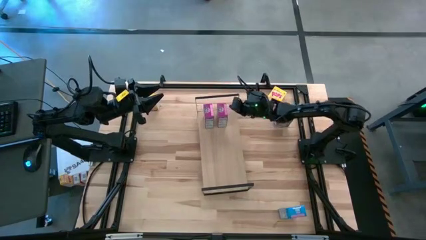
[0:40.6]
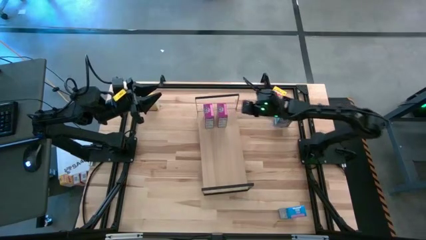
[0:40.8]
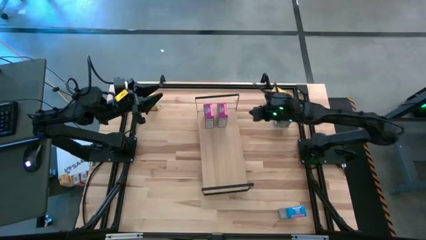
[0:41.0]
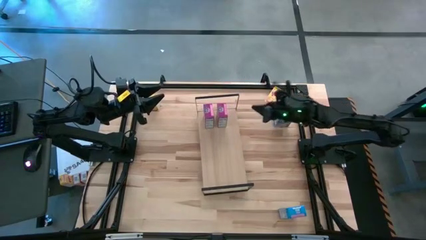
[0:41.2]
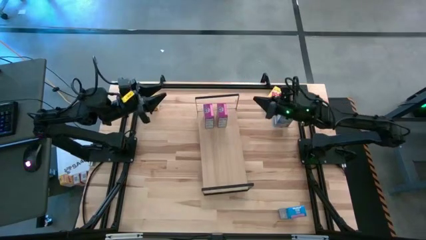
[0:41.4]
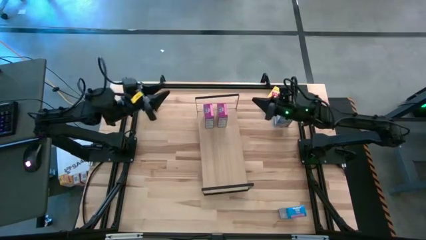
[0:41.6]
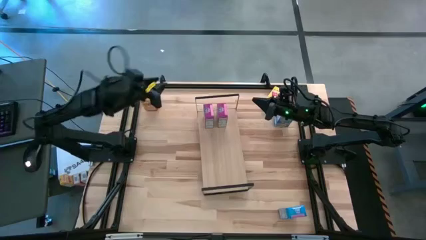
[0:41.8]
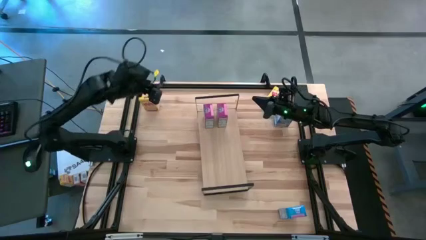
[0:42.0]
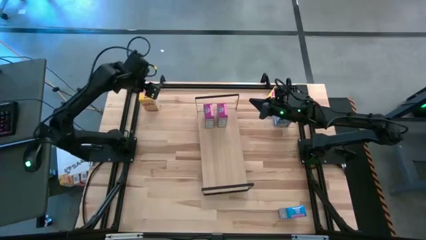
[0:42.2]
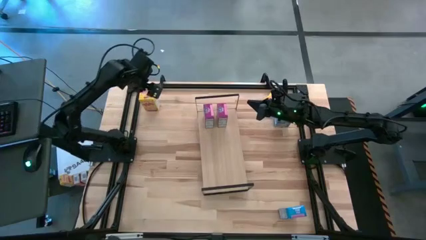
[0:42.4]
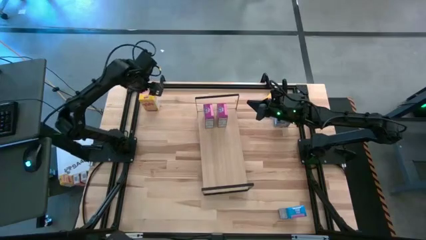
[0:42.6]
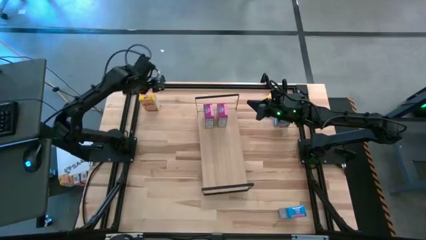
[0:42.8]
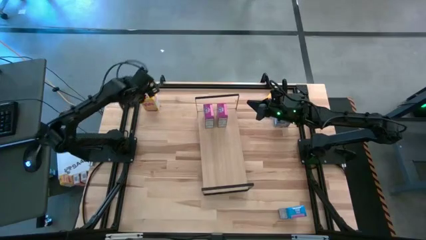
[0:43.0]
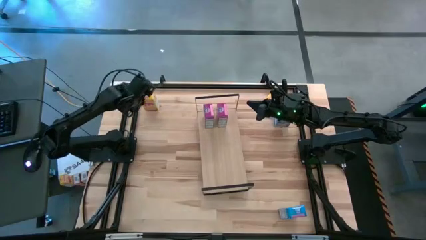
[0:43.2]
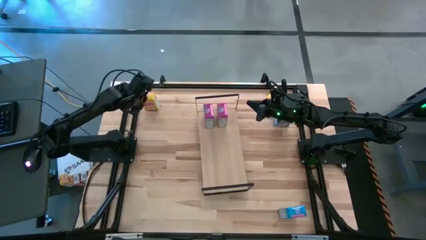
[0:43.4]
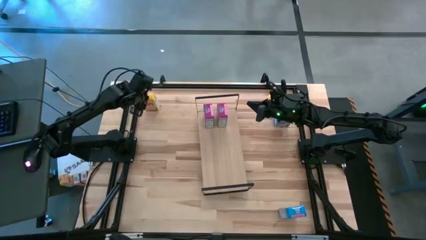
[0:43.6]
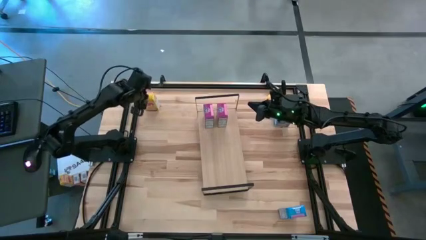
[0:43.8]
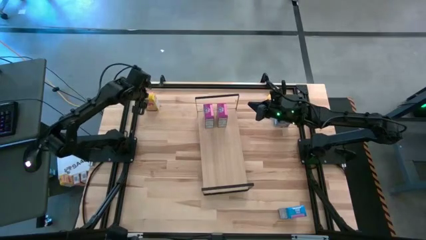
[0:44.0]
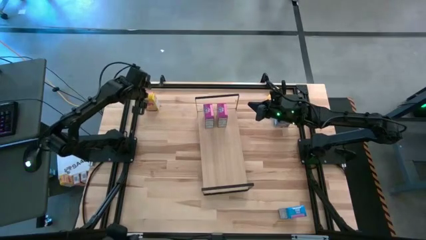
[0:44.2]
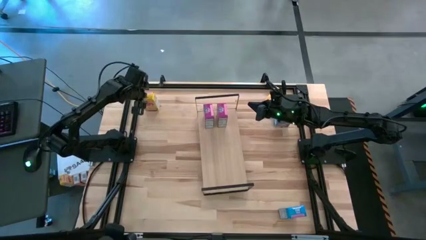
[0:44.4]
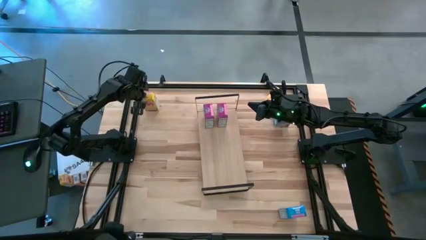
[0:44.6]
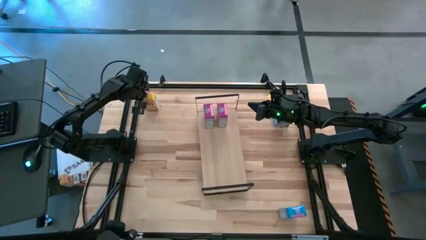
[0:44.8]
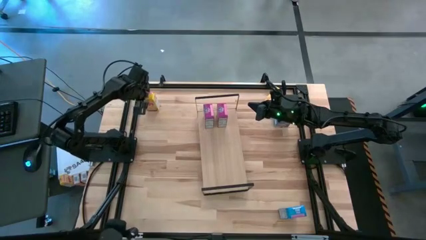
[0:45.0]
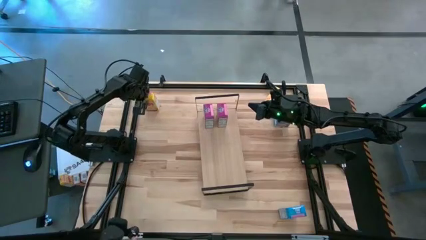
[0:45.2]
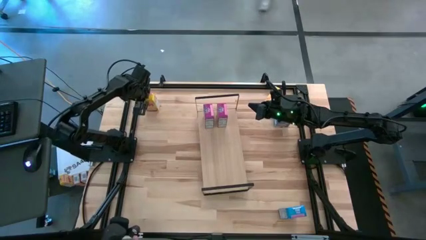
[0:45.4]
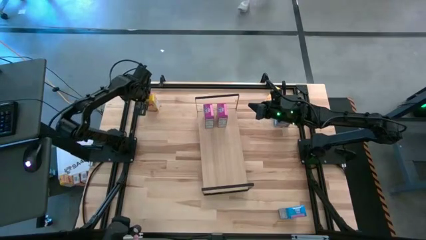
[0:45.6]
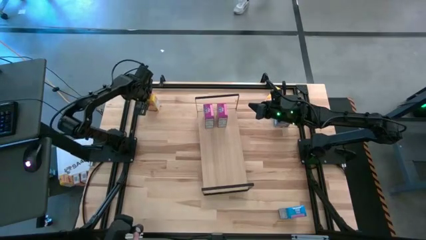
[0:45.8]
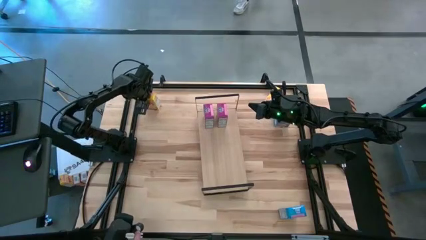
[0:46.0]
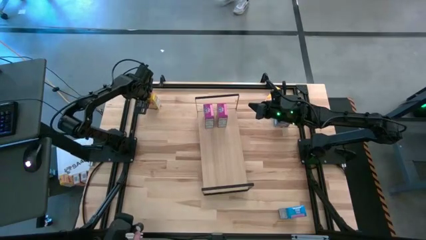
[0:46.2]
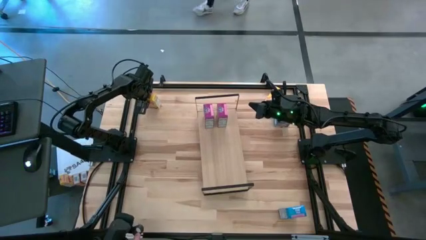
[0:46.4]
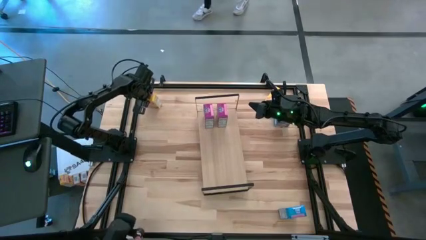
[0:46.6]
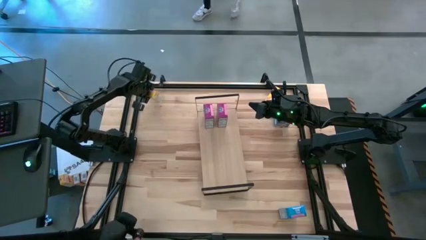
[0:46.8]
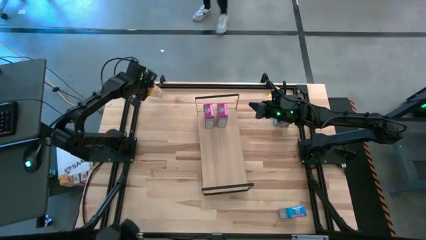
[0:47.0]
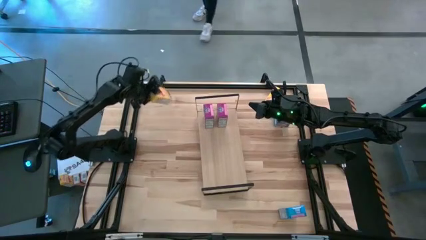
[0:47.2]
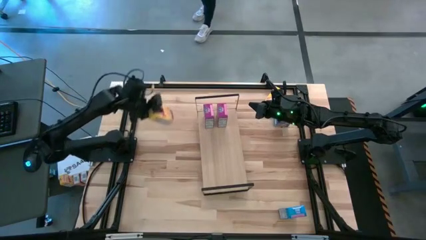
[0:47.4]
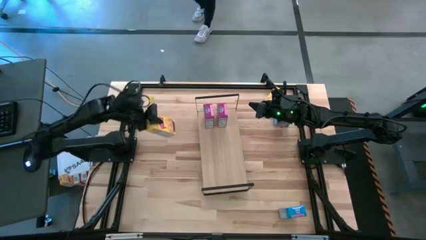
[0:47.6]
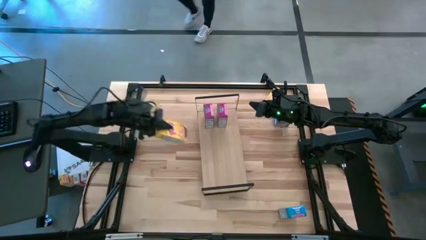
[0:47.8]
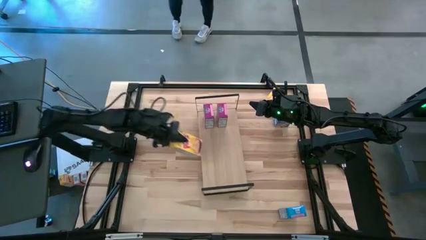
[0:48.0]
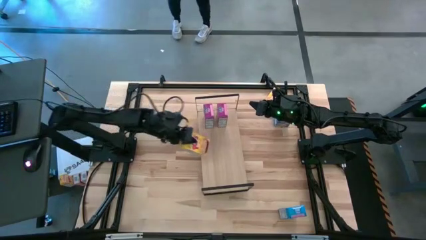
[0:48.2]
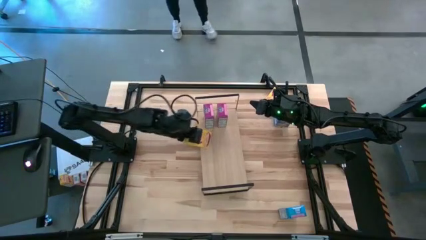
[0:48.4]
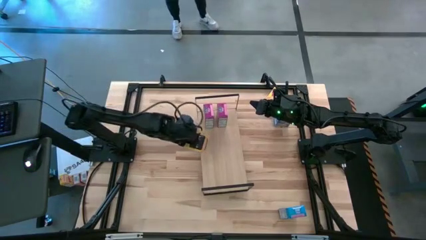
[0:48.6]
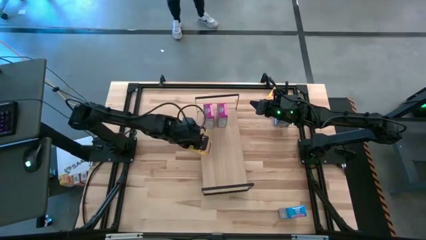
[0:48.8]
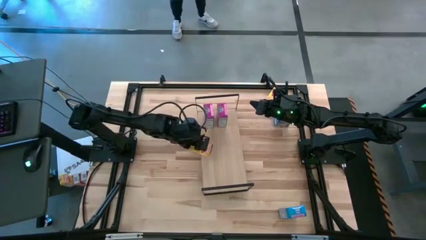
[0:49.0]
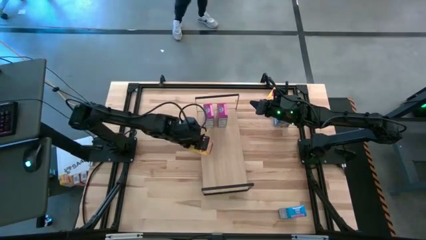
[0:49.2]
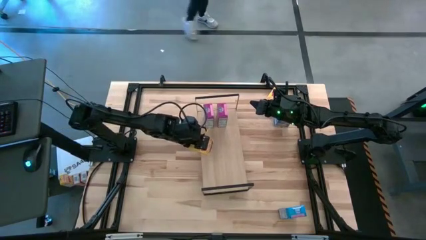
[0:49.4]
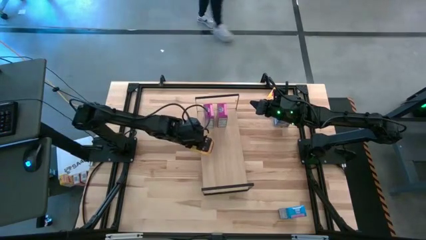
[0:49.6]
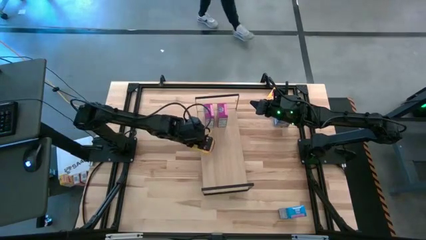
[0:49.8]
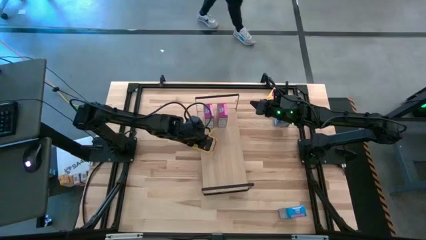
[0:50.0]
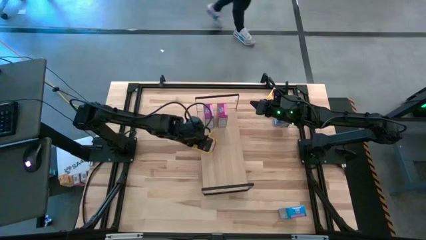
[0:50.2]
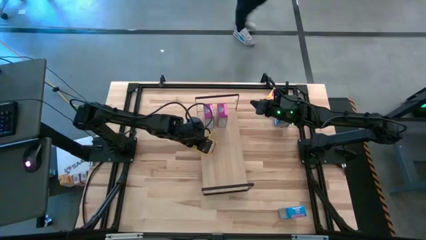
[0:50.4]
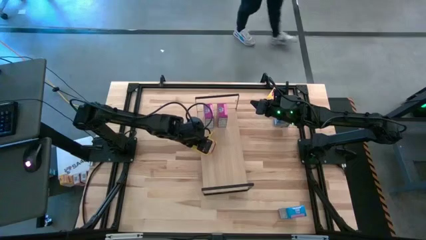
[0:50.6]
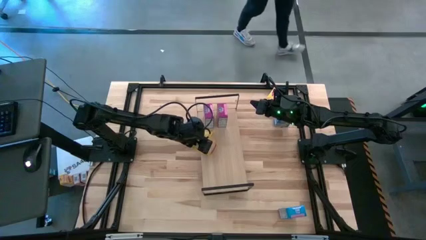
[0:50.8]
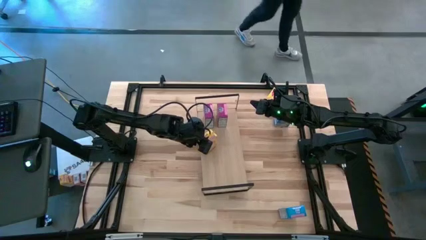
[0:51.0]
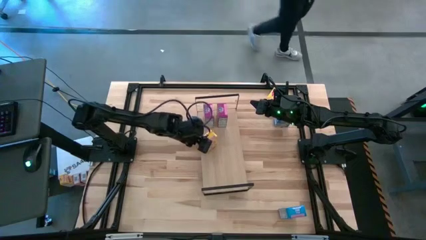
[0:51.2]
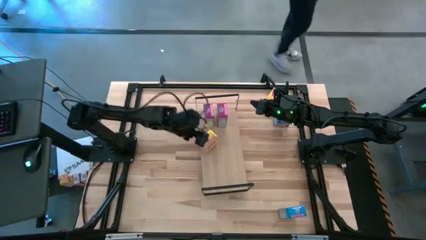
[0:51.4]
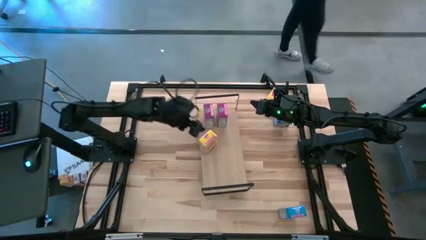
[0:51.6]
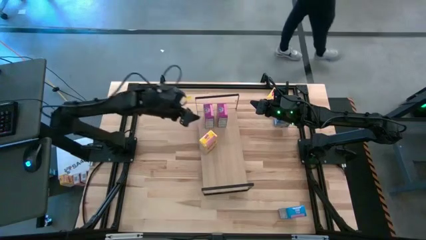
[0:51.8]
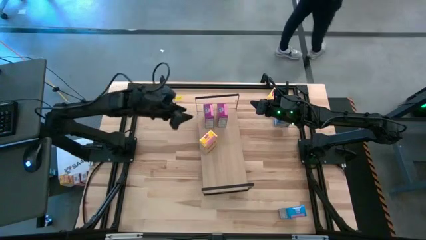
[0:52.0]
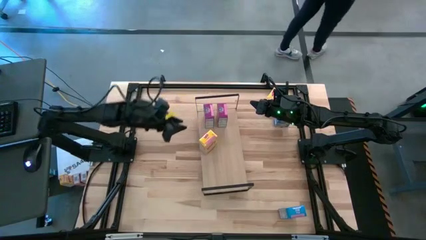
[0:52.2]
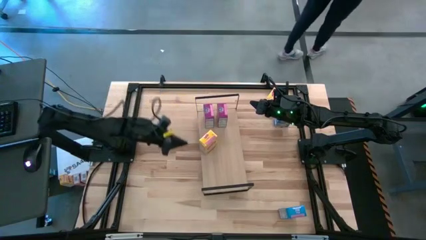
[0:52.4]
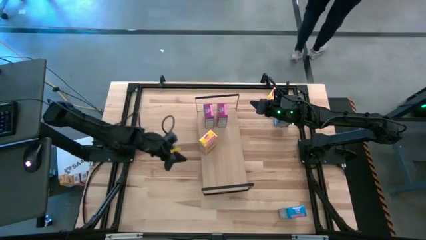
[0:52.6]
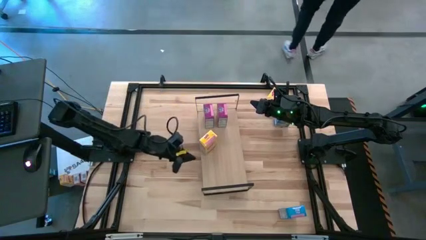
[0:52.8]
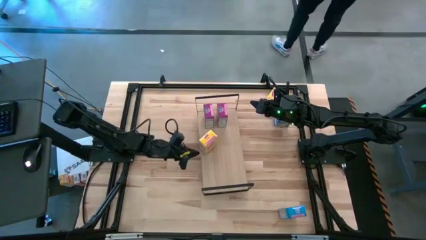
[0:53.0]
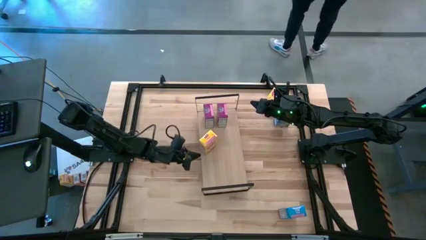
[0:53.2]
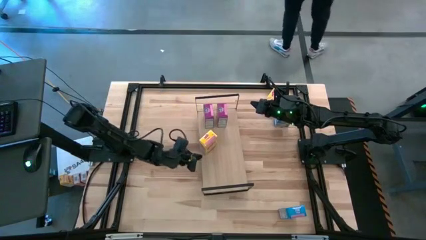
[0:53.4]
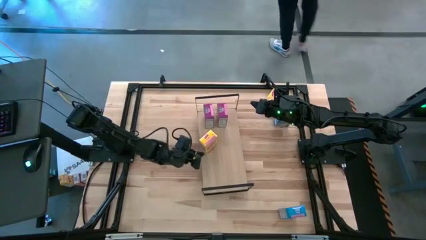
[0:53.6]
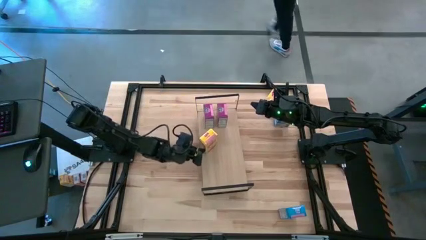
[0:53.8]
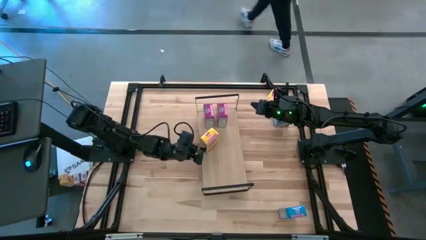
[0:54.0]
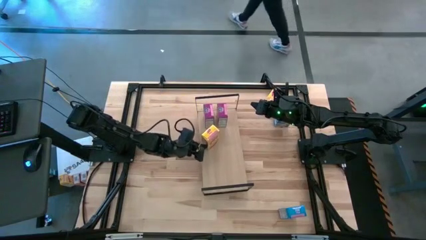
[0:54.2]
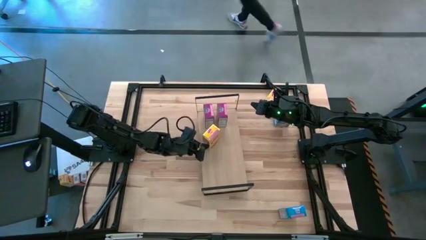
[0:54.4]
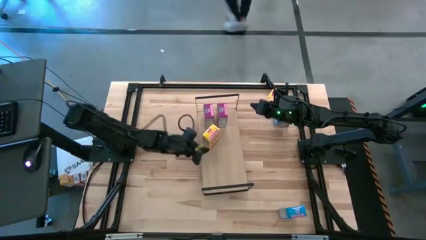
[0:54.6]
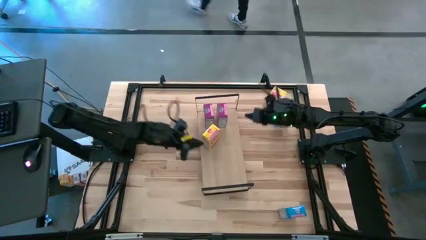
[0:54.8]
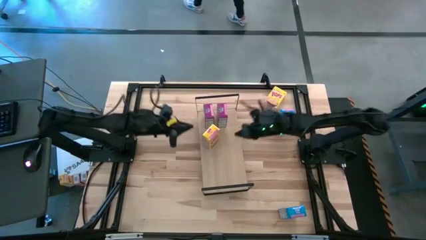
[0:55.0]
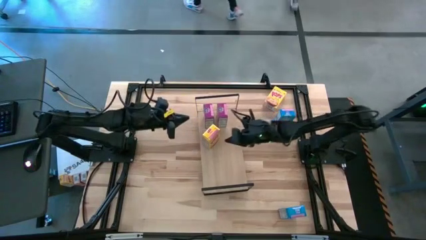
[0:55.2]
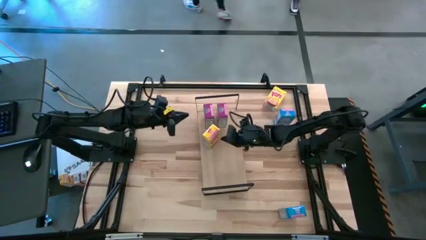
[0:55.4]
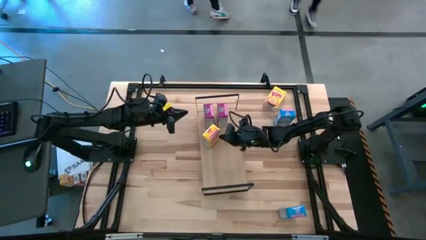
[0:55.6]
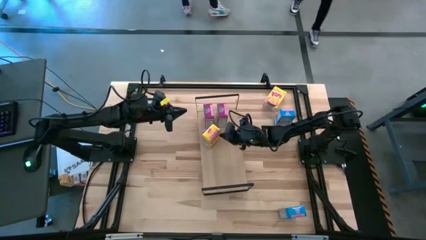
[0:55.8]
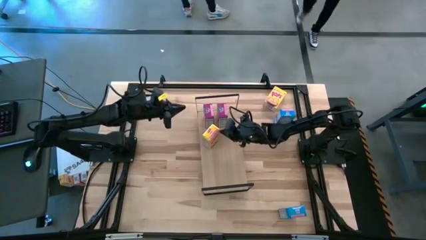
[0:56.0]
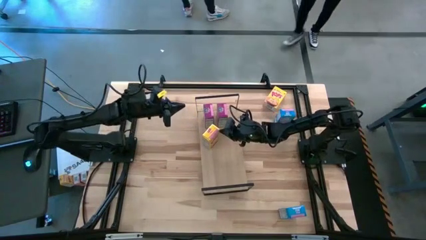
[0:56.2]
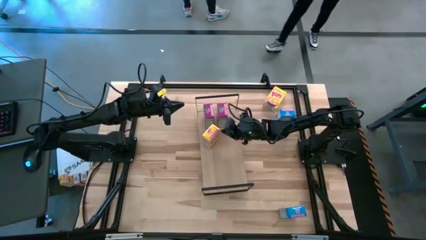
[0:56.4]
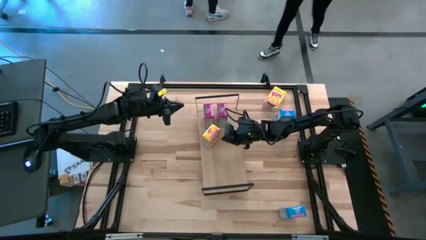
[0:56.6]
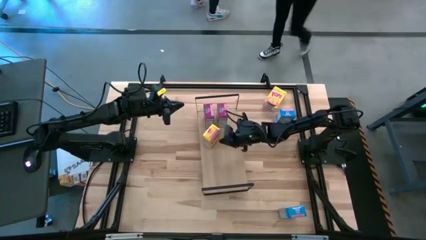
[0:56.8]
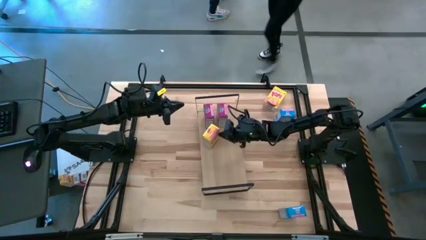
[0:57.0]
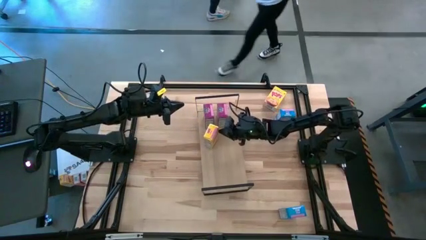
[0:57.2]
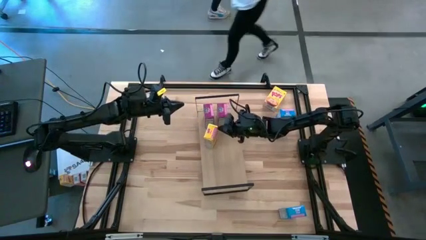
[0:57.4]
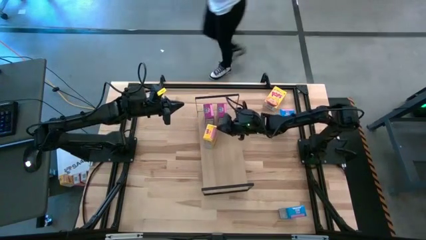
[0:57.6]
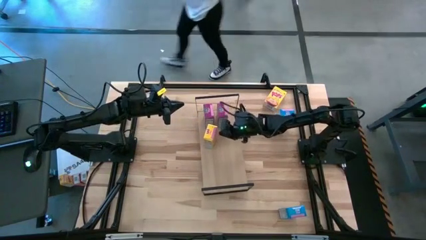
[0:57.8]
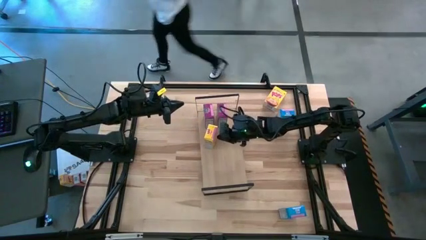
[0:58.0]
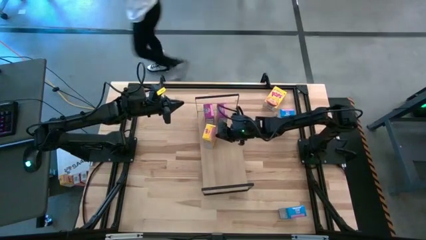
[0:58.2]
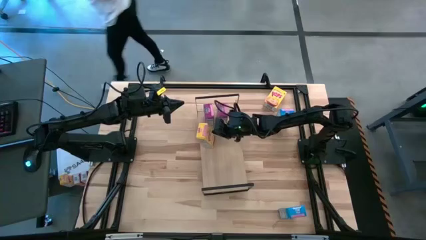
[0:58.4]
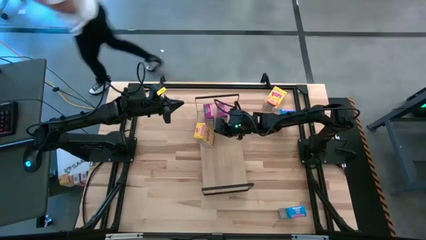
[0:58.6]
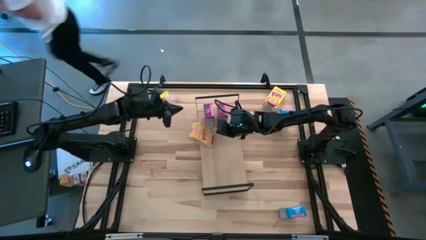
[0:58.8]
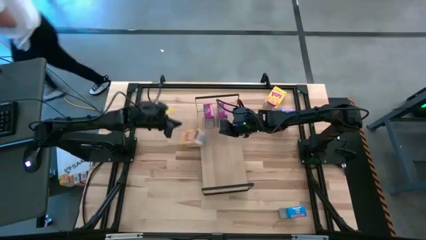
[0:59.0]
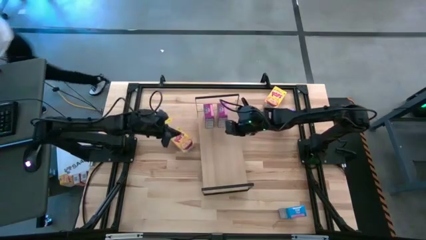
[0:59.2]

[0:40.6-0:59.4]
Task: Stack cereal on shelf
Put the left yellow cereal box on the shelf
